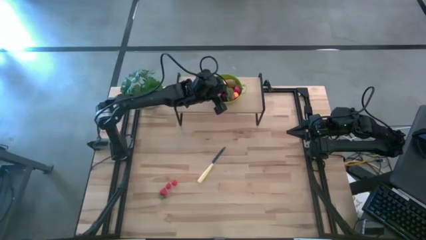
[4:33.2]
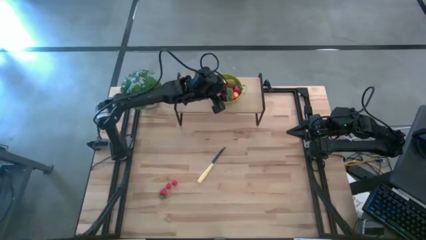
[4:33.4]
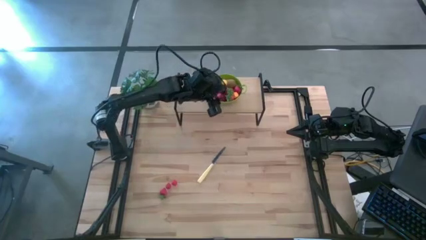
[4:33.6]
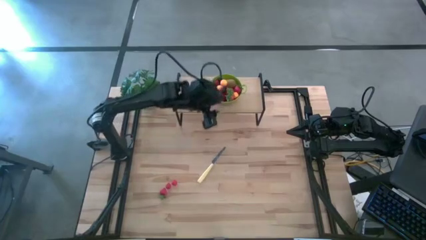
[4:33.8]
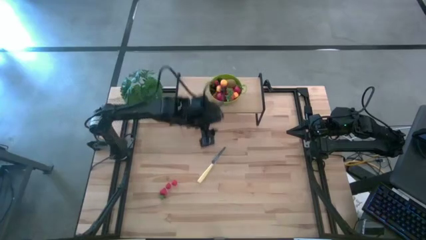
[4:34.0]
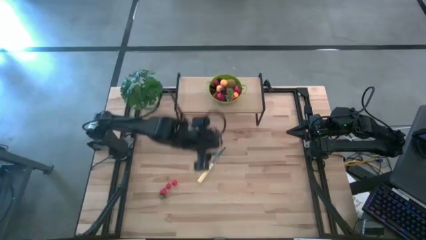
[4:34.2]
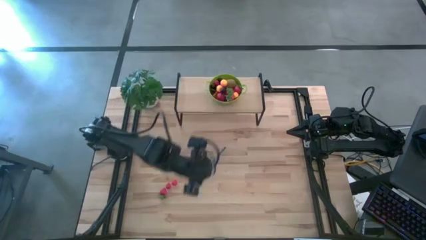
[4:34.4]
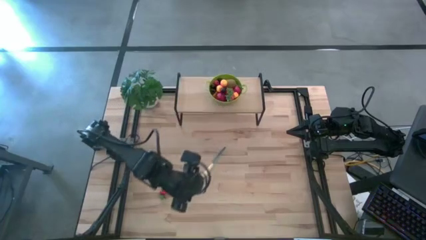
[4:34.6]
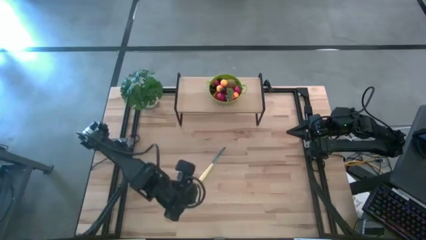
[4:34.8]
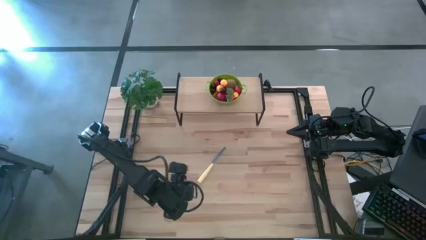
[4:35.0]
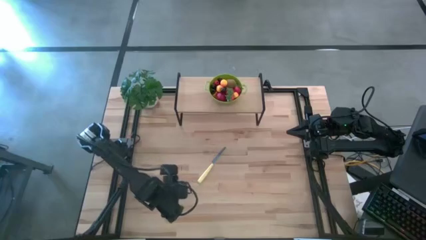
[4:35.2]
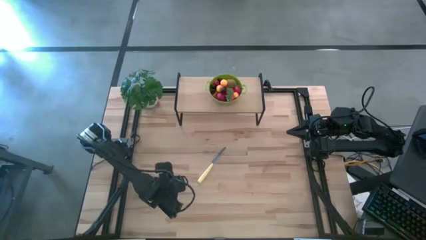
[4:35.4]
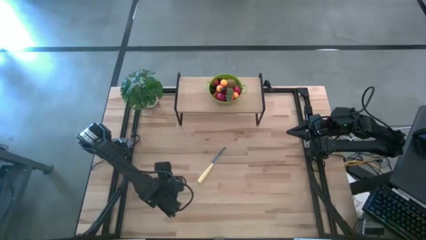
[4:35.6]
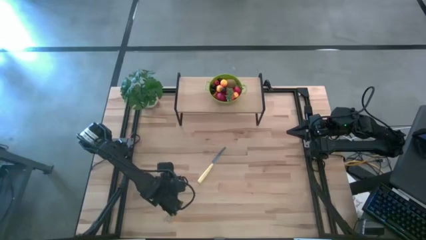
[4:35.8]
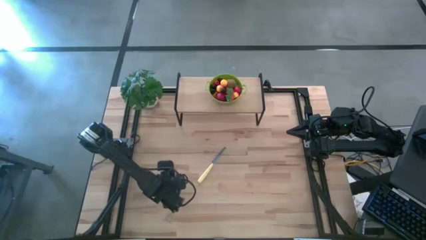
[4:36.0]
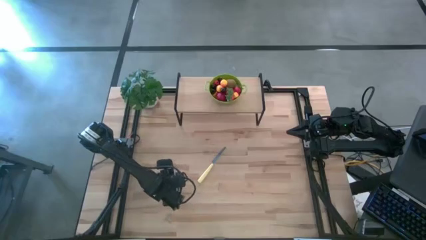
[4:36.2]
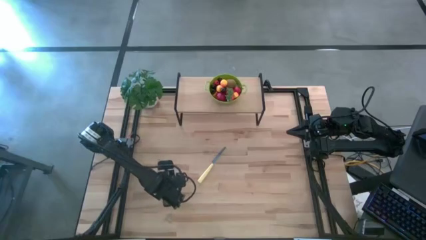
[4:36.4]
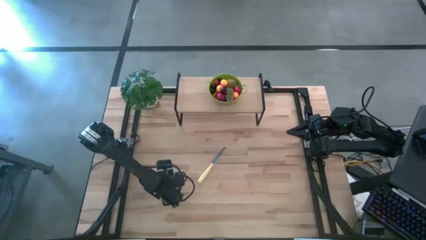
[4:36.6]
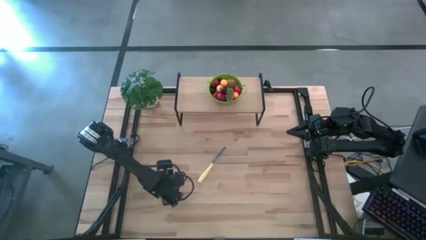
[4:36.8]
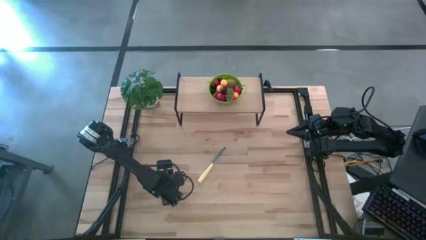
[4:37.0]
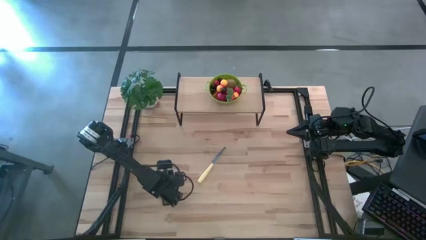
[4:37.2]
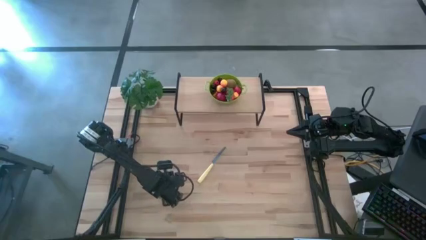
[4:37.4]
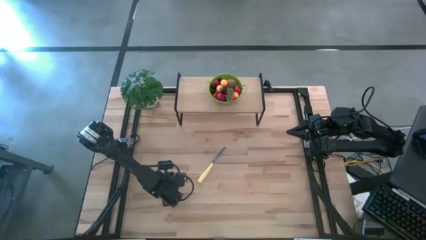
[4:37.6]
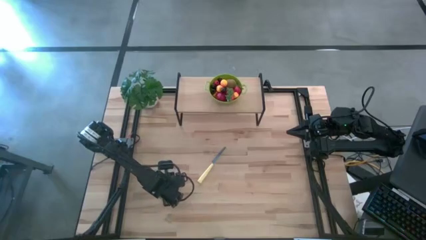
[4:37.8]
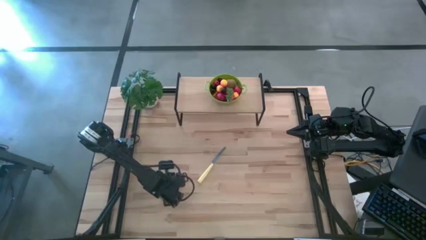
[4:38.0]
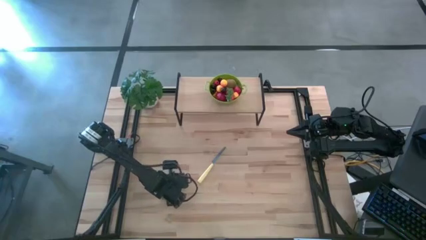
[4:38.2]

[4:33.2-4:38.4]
Task: Pick & Place Fruit
Put the red cherry into the strainer bowl

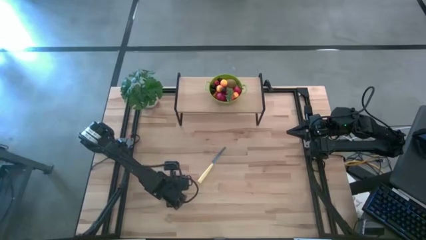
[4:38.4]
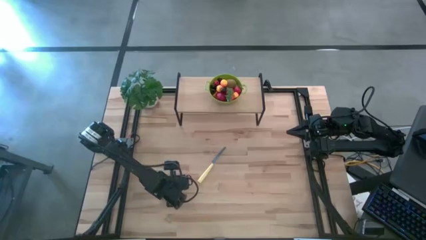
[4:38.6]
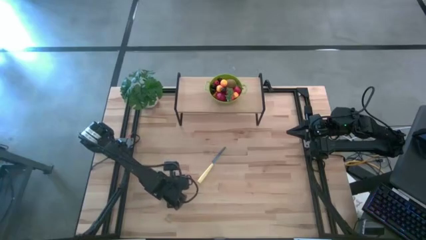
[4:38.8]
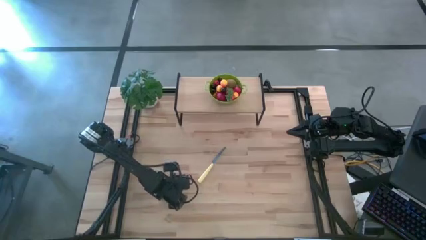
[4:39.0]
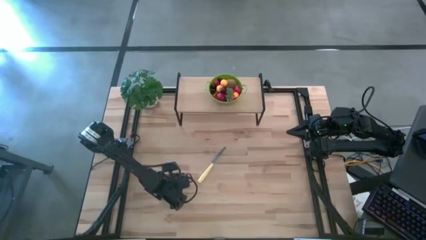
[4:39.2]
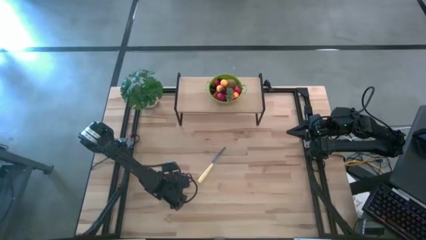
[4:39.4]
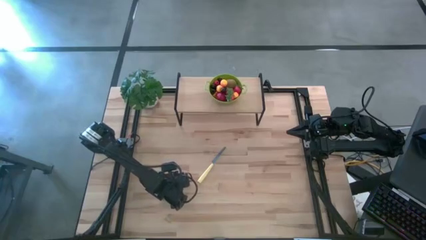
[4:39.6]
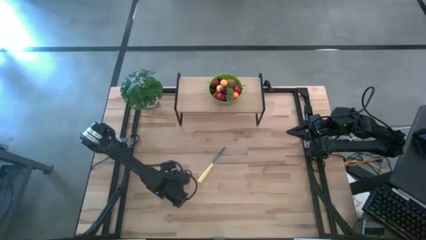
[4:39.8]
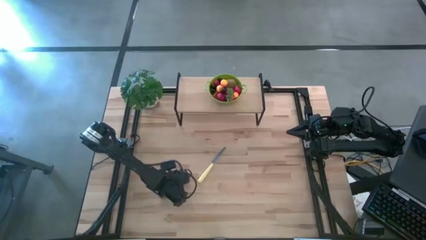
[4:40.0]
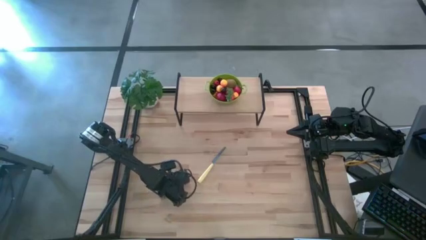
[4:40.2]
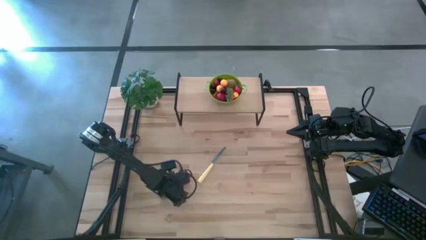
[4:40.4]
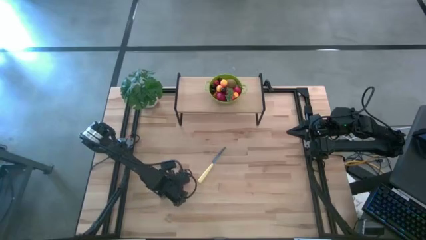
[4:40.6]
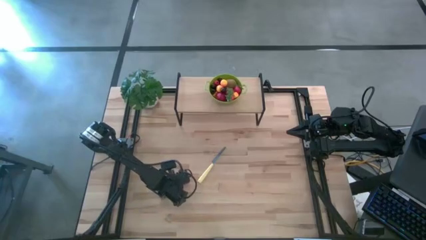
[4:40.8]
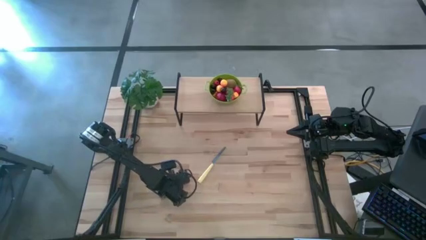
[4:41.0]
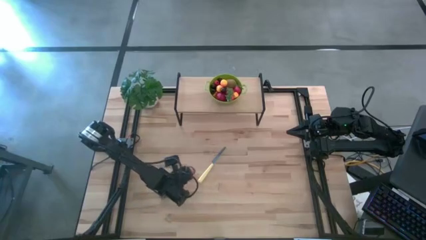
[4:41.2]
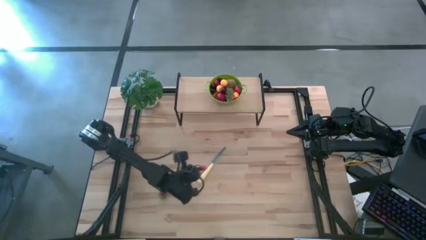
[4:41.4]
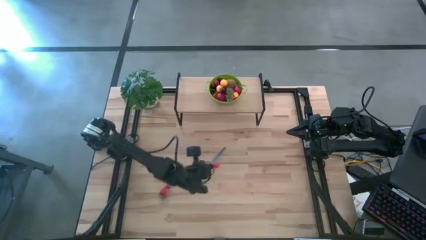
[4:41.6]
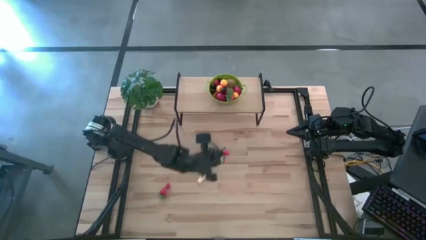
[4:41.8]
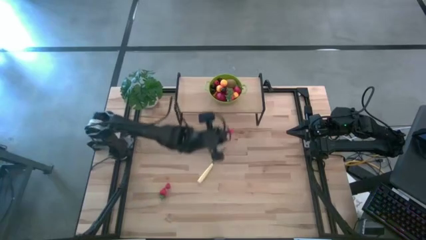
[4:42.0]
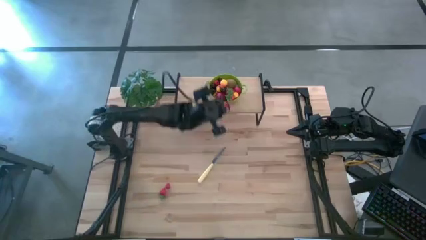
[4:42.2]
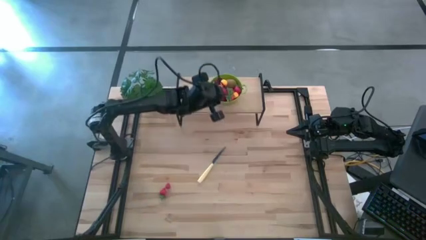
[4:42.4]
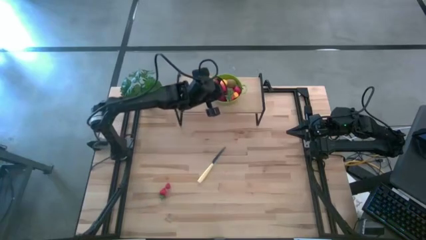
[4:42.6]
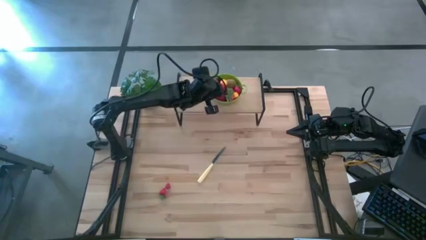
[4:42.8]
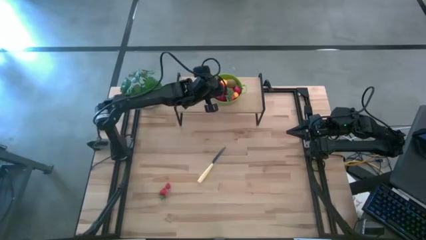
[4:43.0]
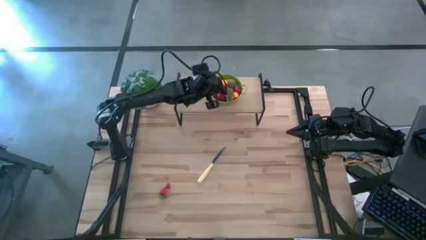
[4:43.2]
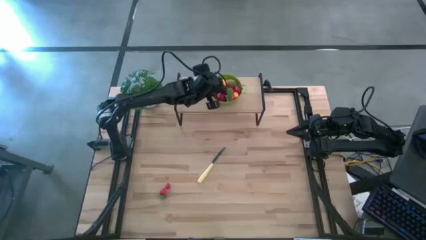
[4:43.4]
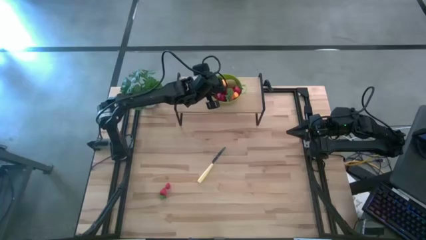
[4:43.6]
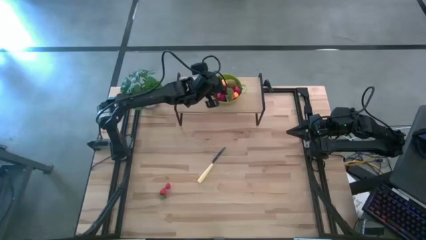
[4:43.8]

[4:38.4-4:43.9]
Put the red cherry into the strainer bowl

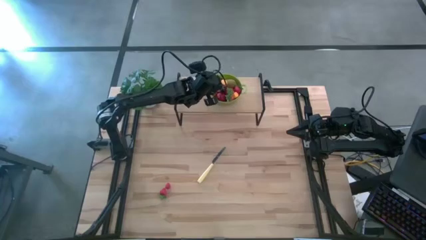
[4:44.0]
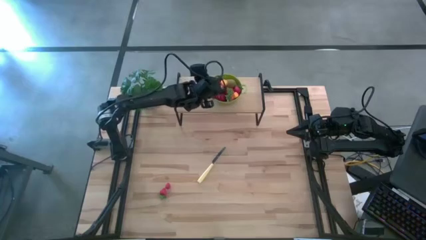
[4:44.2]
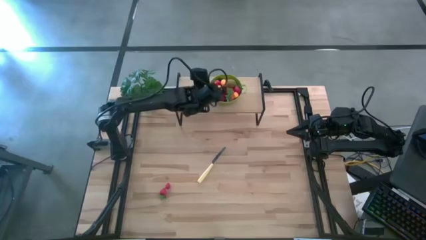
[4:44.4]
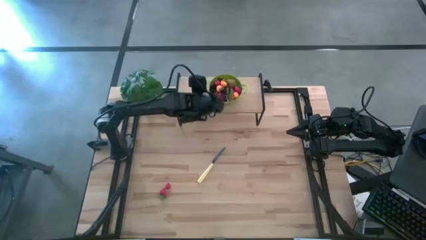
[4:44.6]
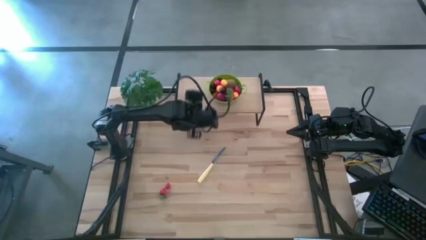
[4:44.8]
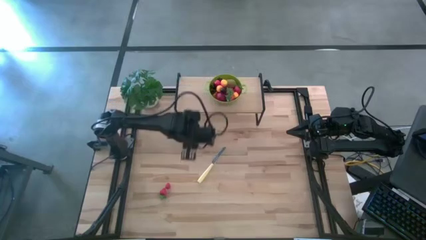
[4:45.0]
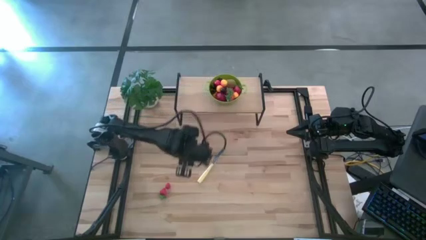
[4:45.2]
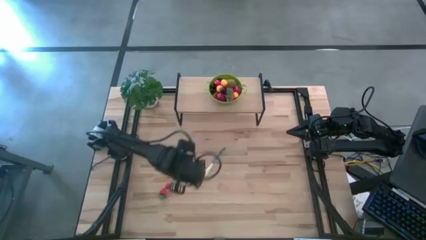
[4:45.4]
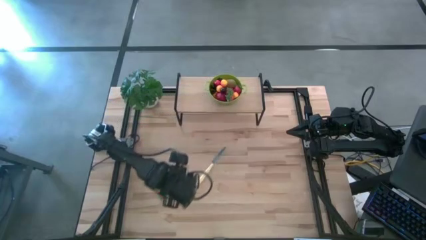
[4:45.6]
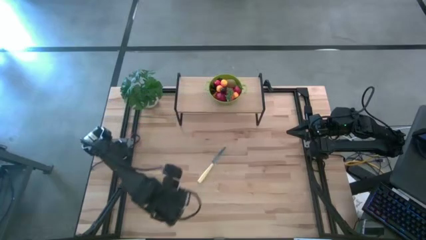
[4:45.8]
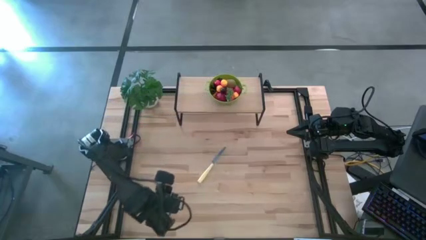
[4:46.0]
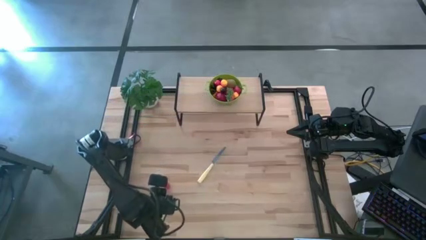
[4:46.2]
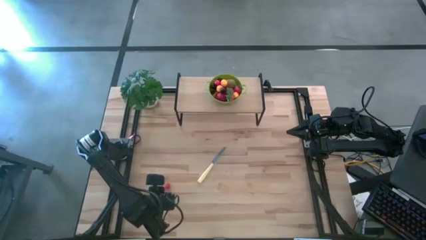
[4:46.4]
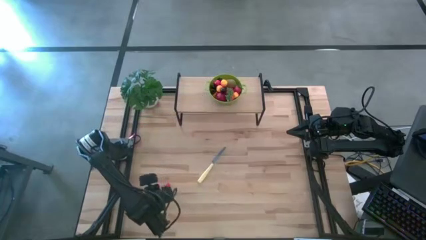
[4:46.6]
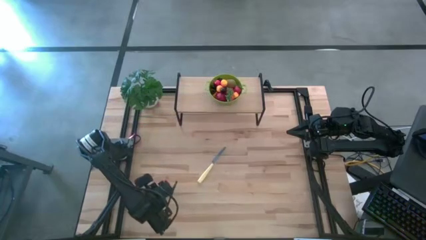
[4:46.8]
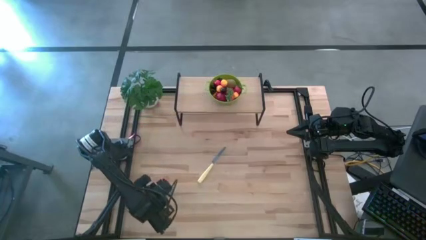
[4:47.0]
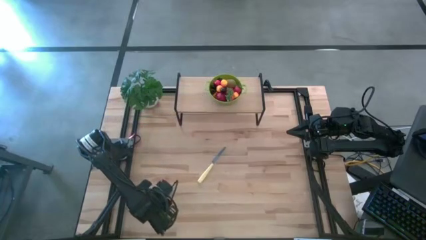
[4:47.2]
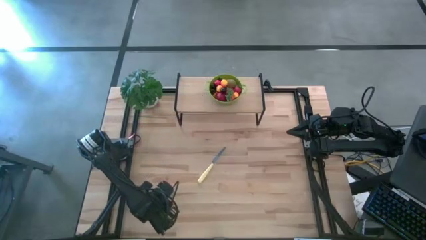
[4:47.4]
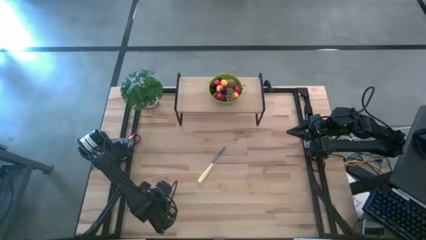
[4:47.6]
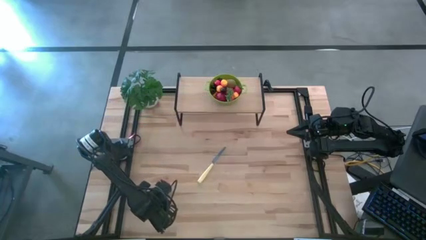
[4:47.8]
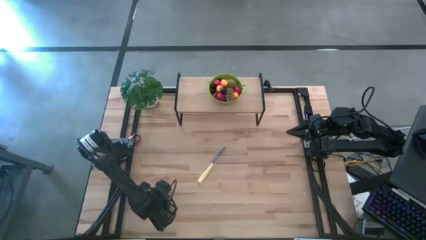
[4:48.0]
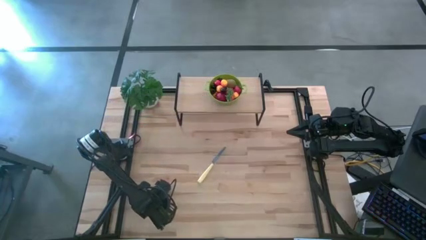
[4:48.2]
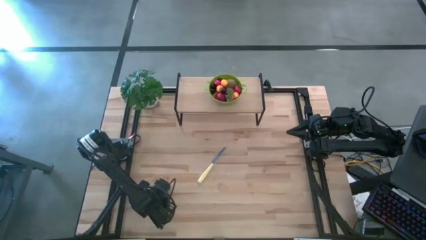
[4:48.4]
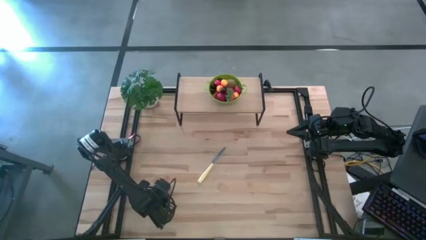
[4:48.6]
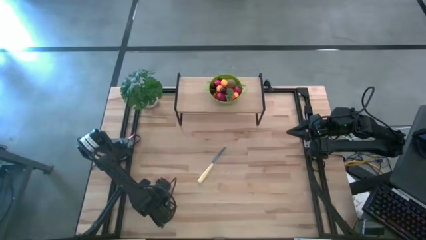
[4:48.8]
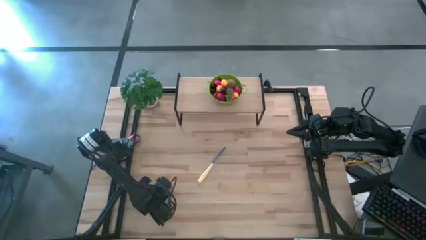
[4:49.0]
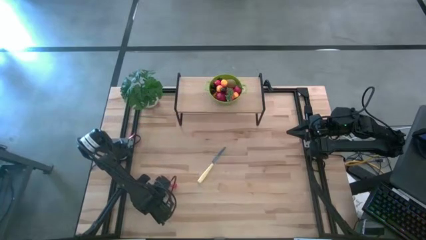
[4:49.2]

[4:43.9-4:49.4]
Put the strawberry into the strainer bowl
